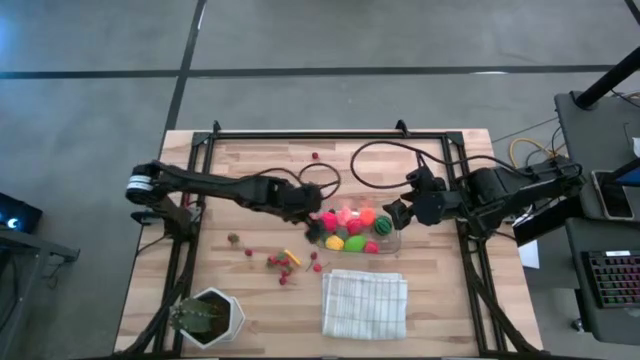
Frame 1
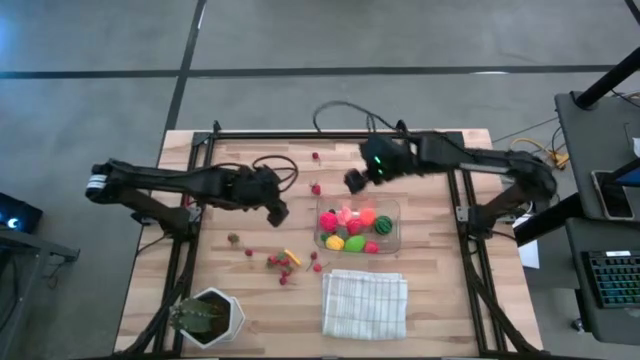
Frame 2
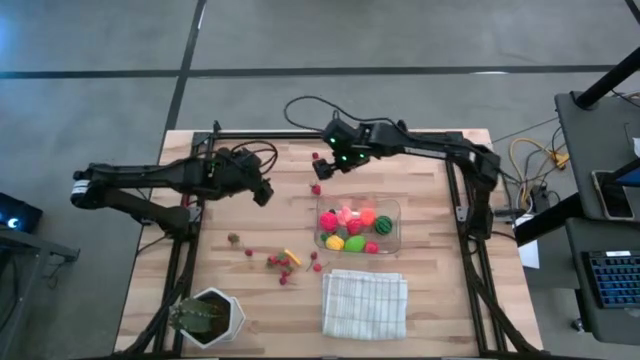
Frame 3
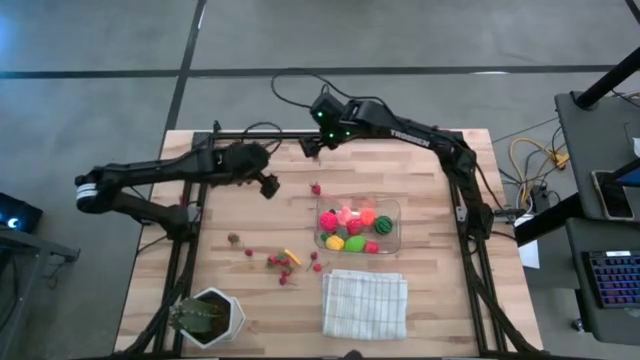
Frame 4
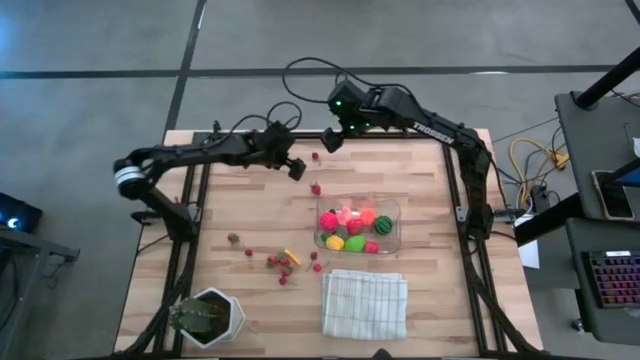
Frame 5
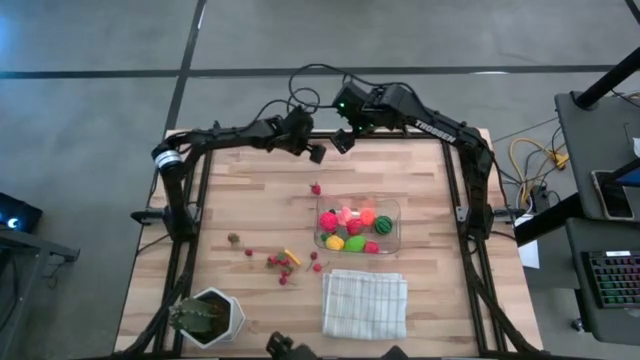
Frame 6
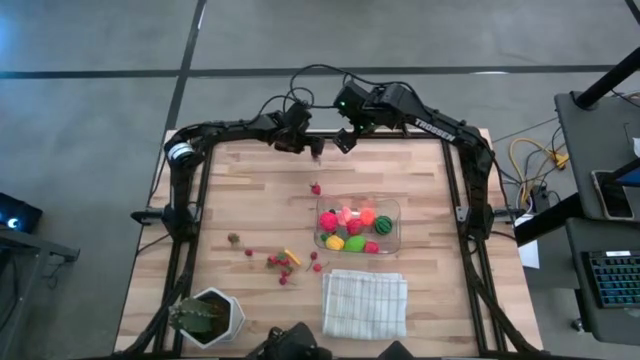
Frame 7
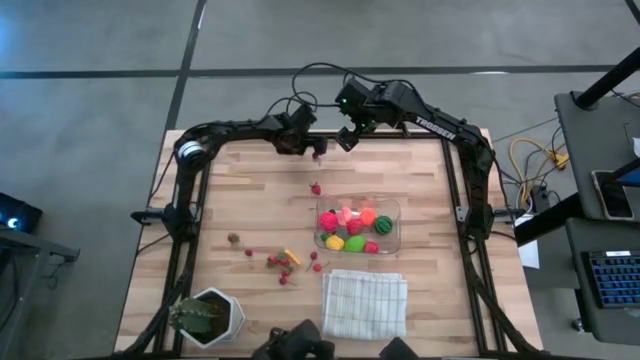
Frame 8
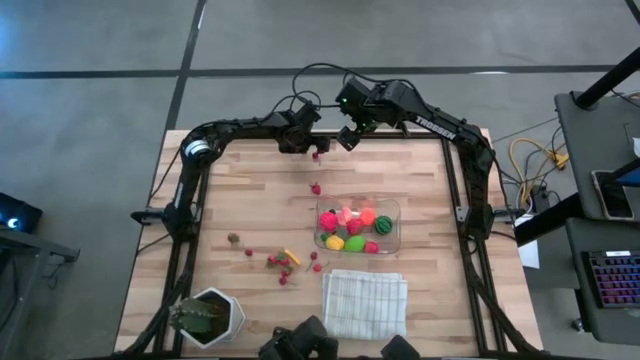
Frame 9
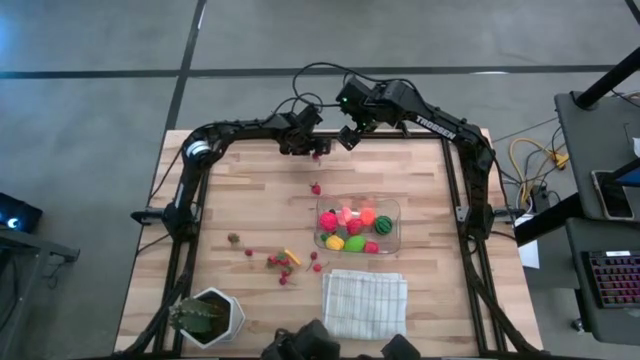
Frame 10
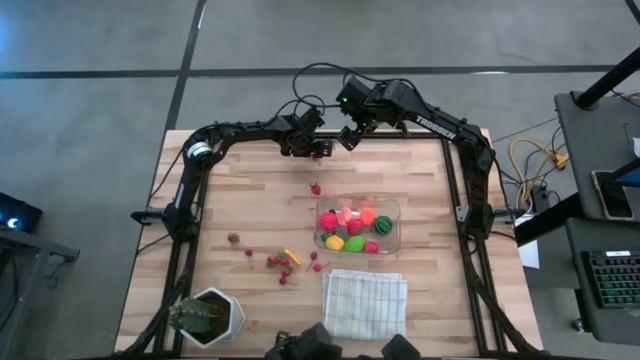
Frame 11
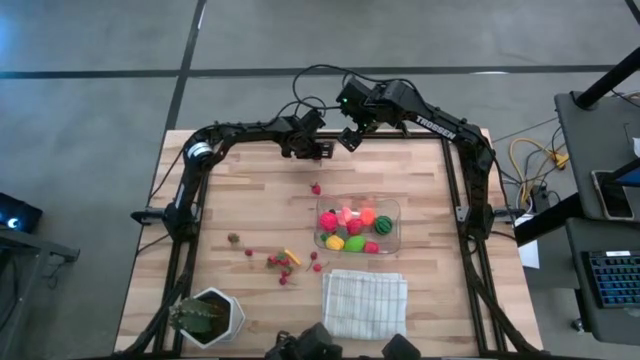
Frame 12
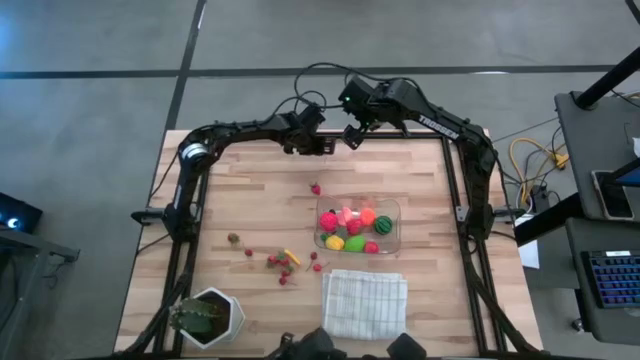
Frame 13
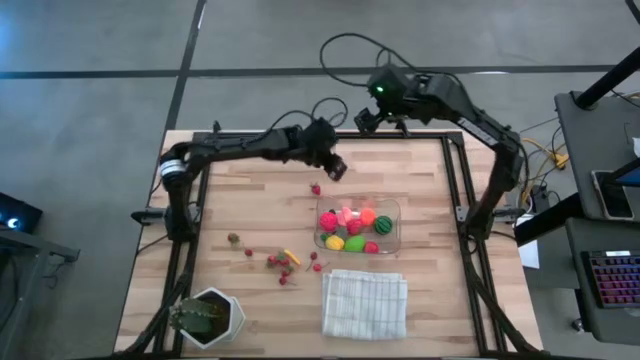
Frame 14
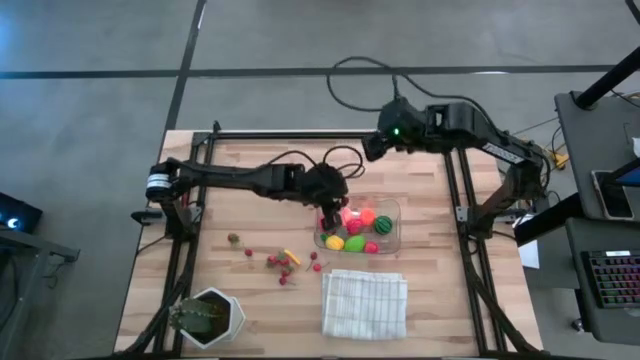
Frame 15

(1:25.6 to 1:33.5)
Task: Pick and placing Produce into tupperware
Put the red cherry into the transparent bin

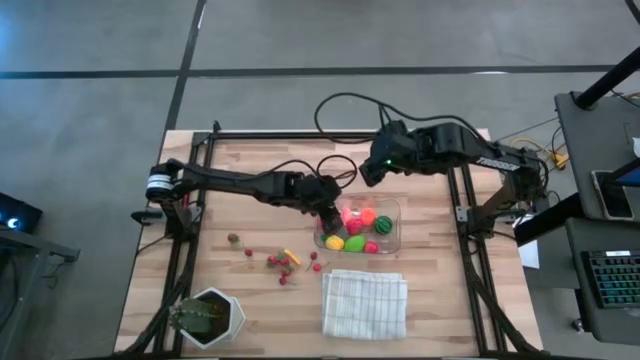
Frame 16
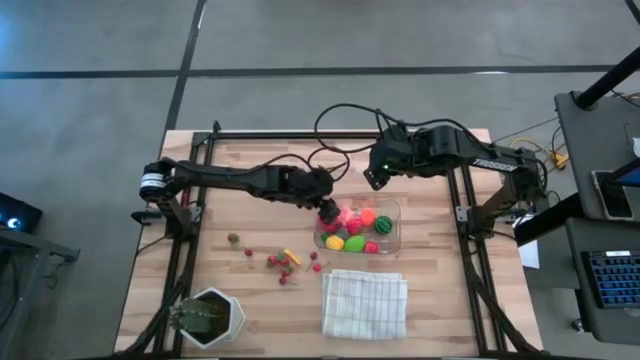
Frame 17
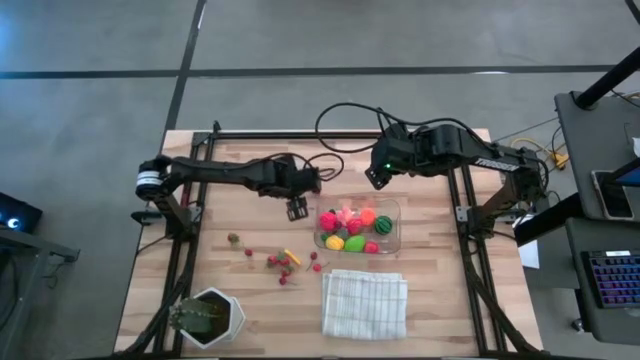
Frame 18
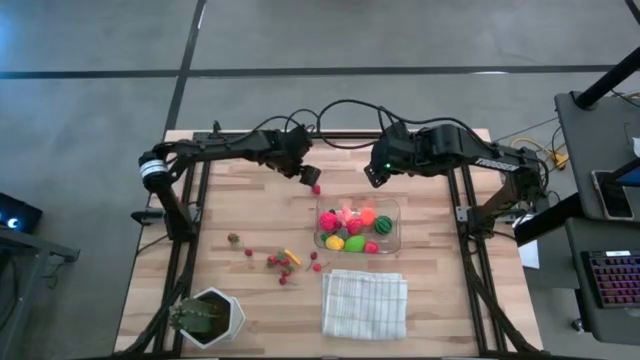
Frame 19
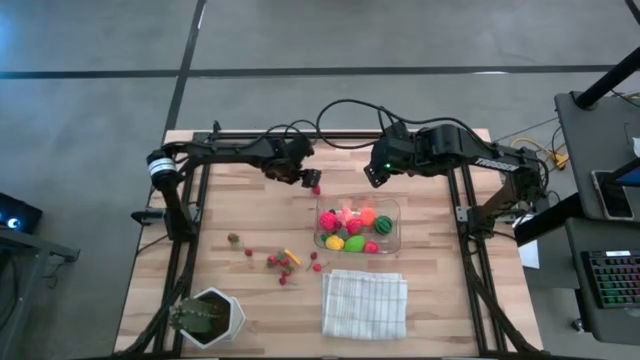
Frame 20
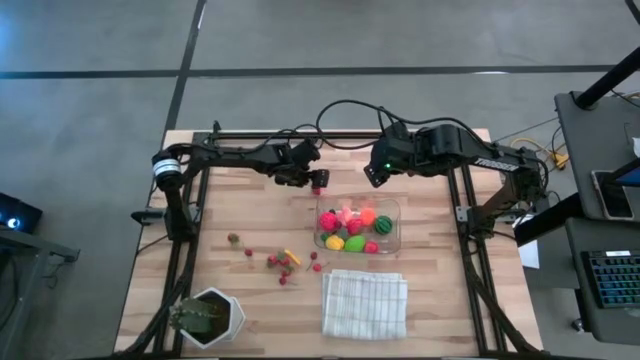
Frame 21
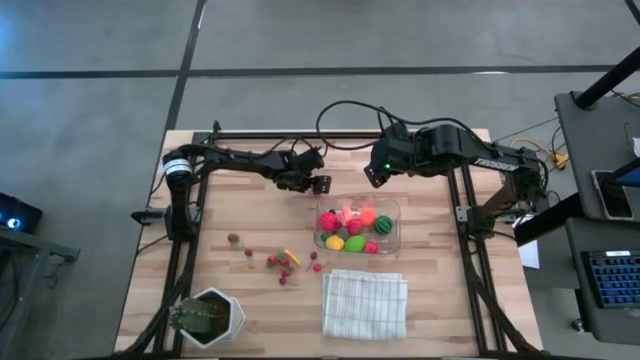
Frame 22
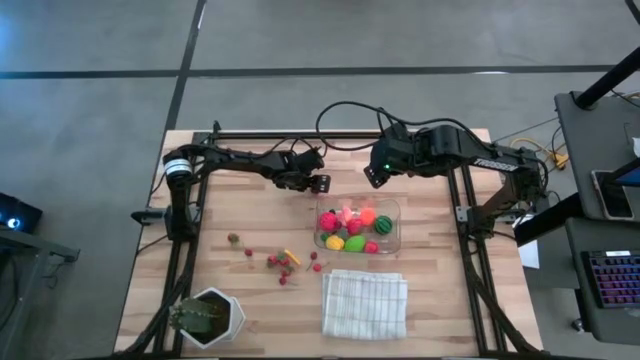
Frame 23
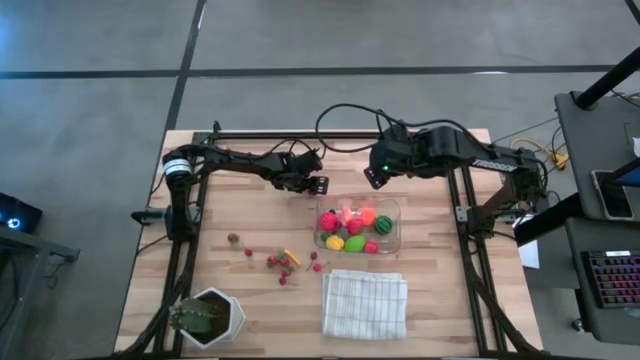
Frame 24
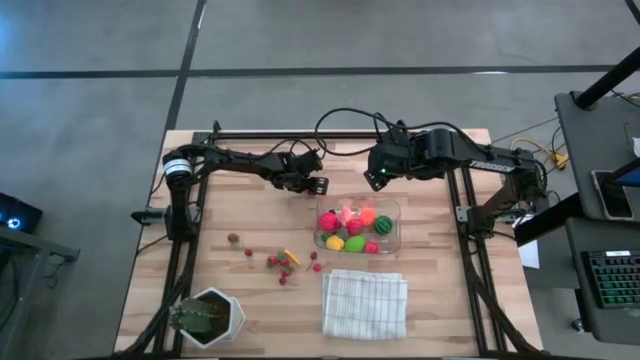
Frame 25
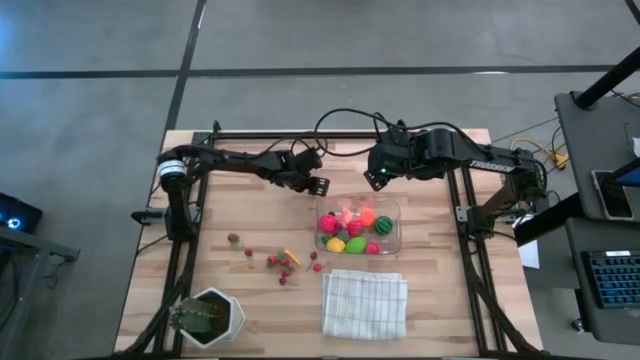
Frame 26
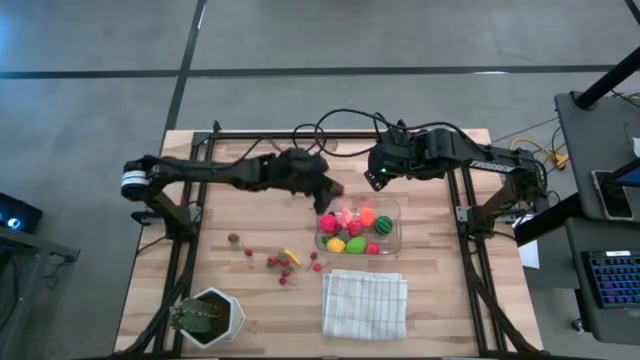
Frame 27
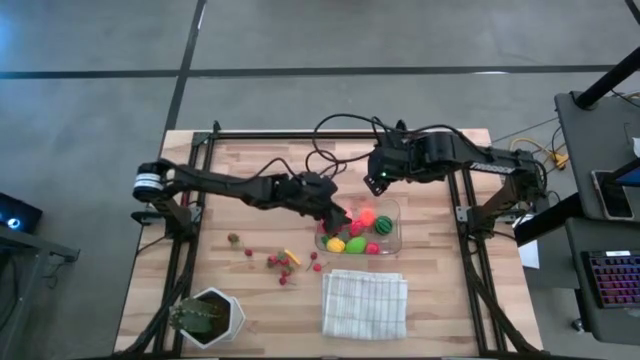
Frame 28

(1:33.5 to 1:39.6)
Put the red strawberry into the transparent bin

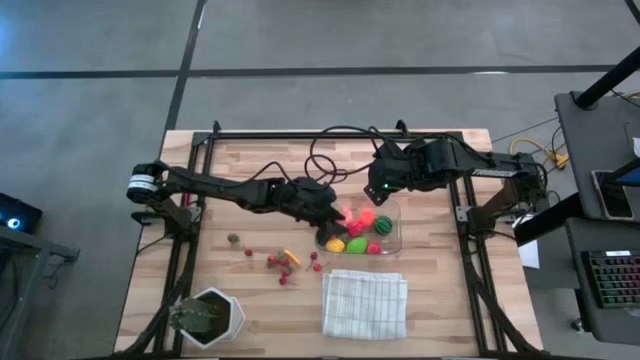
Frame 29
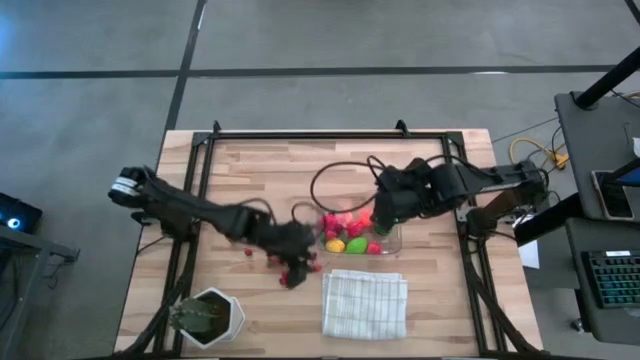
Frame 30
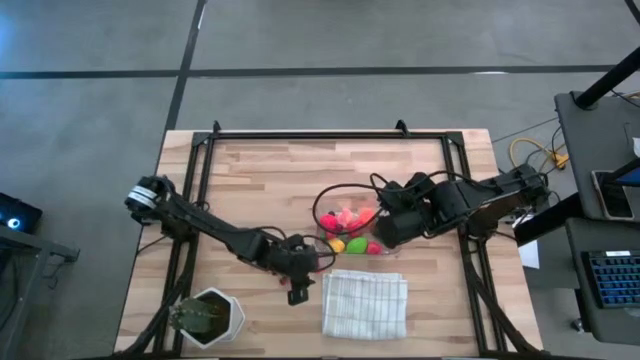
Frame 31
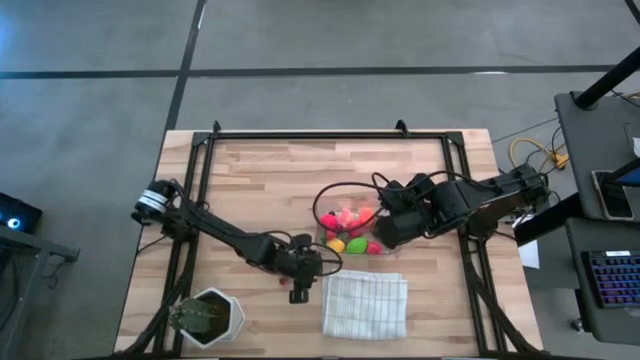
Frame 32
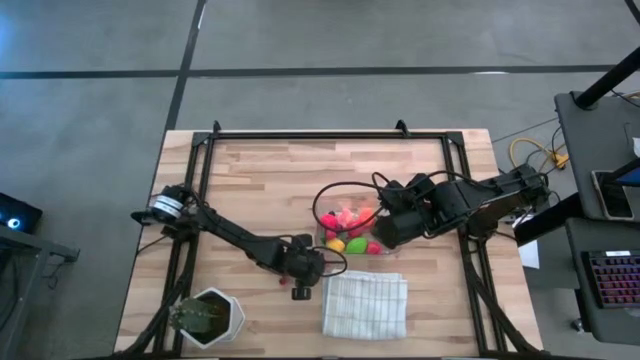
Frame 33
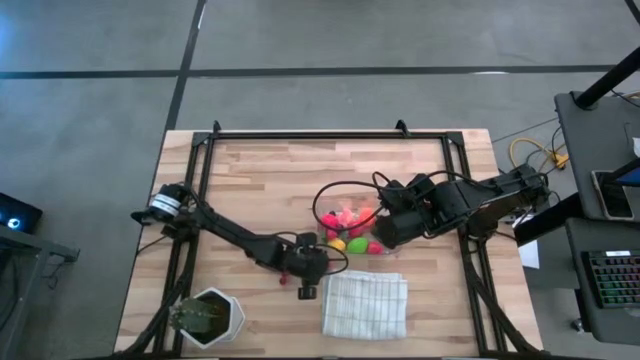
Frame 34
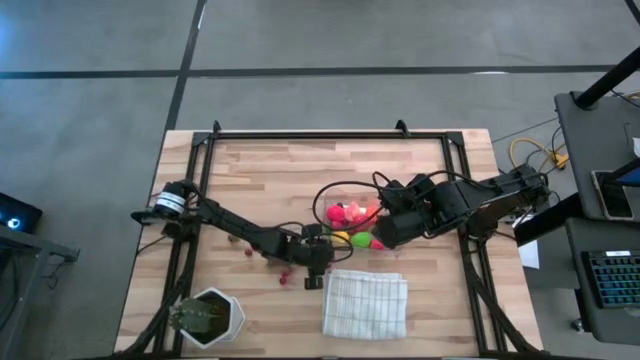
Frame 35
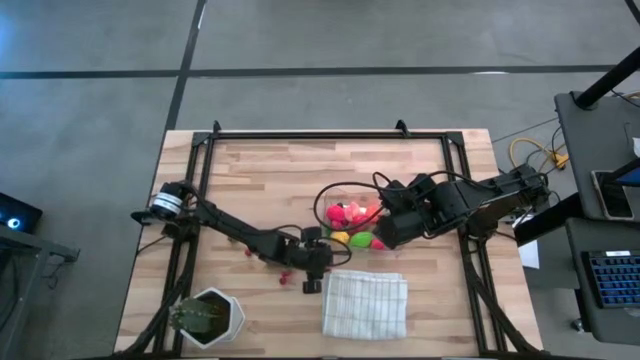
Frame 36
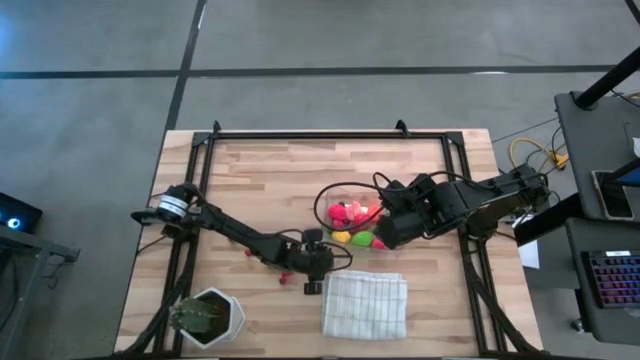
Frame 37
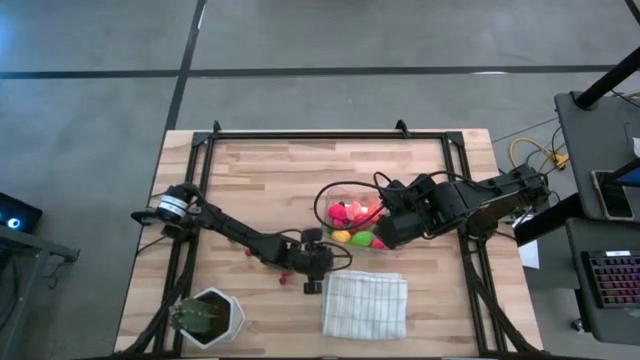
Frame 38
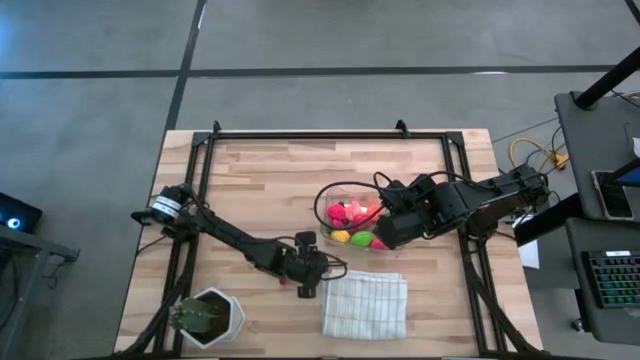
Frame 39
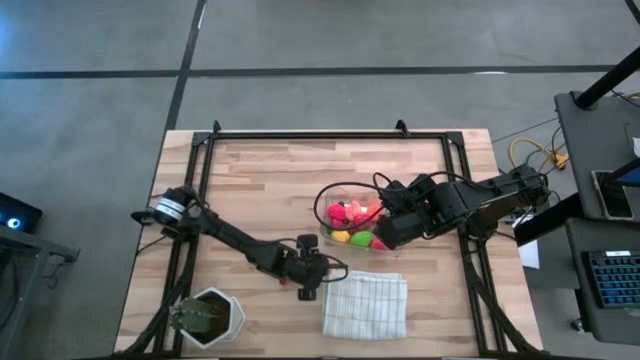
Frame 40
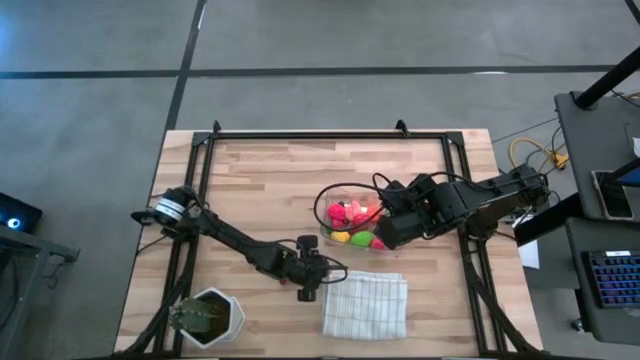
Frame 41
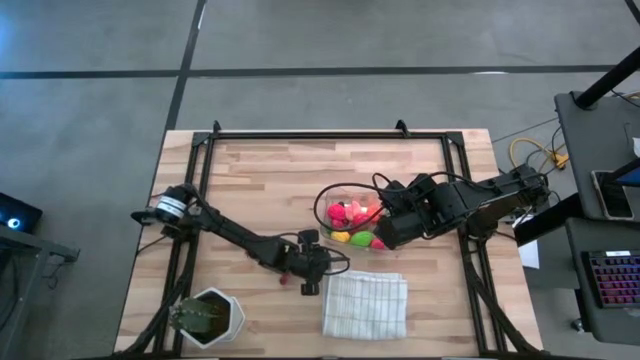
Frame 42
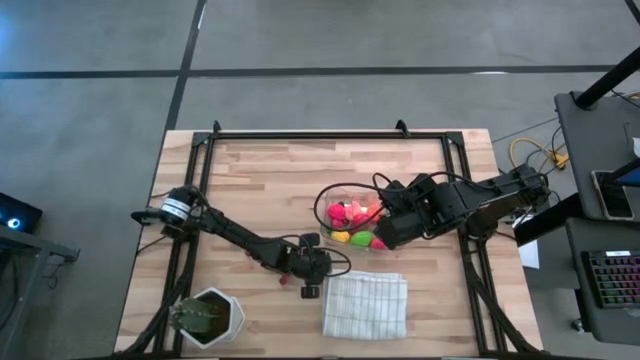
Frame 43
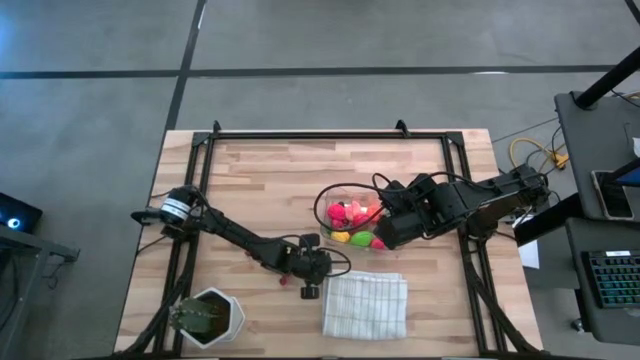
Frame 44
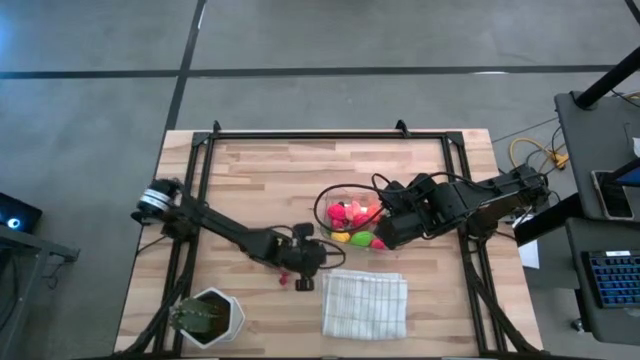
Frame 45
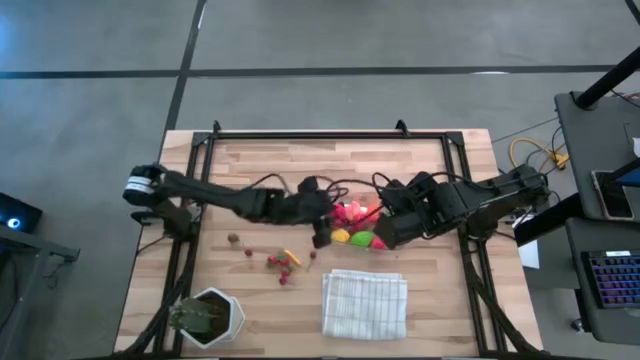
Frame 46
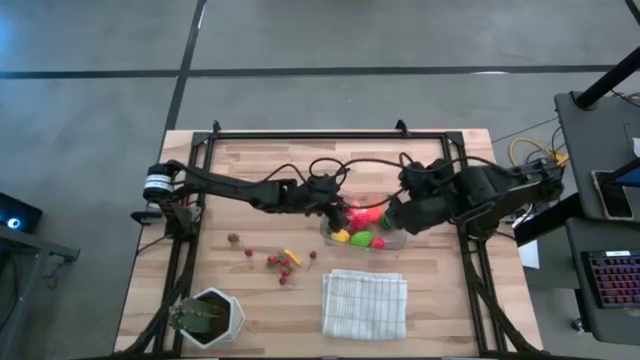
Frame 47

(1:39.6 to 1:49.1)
Put the red cherry into the transparent bin
